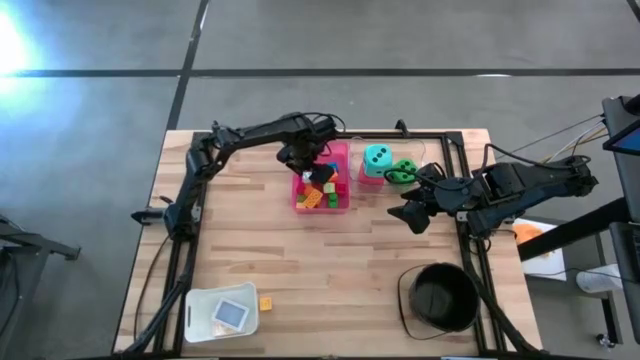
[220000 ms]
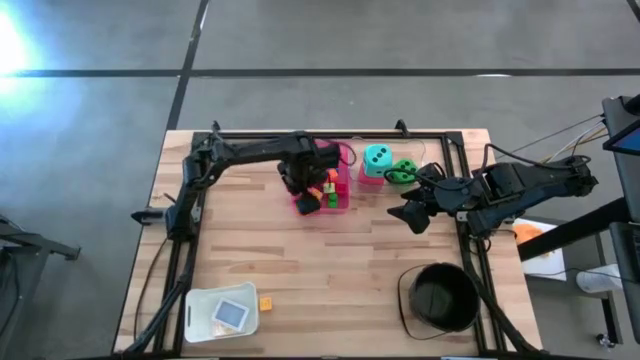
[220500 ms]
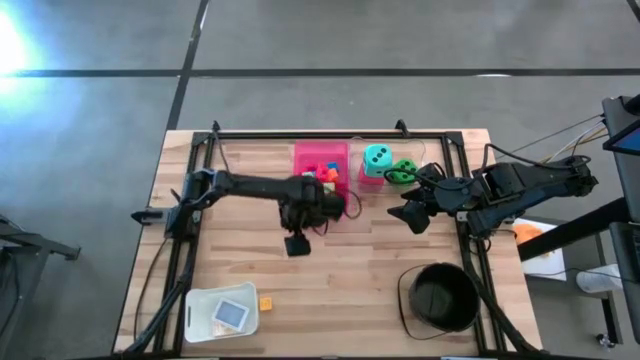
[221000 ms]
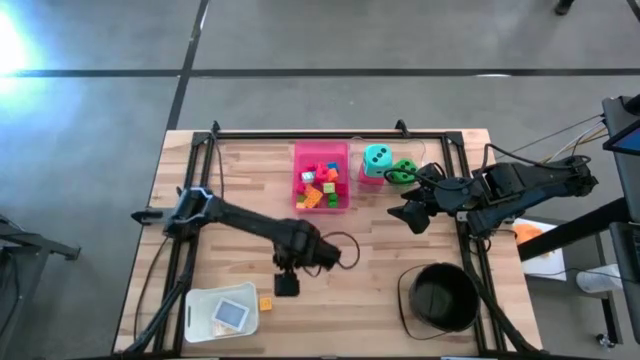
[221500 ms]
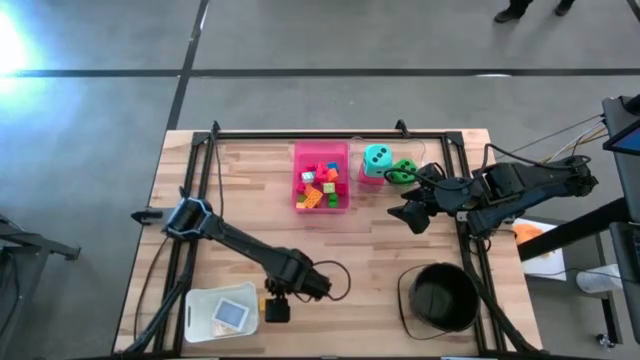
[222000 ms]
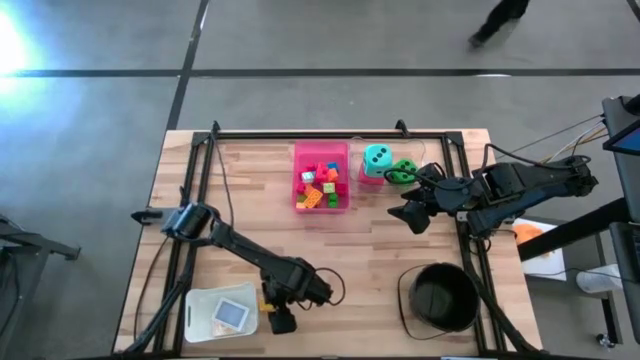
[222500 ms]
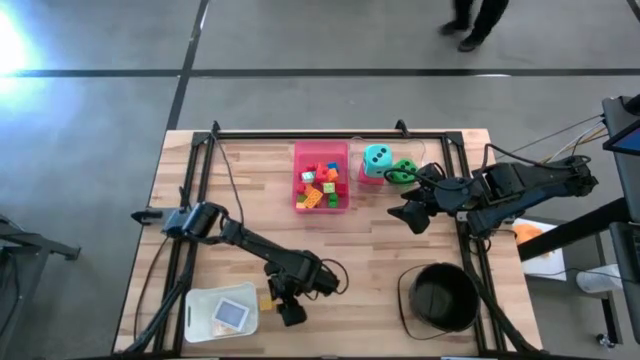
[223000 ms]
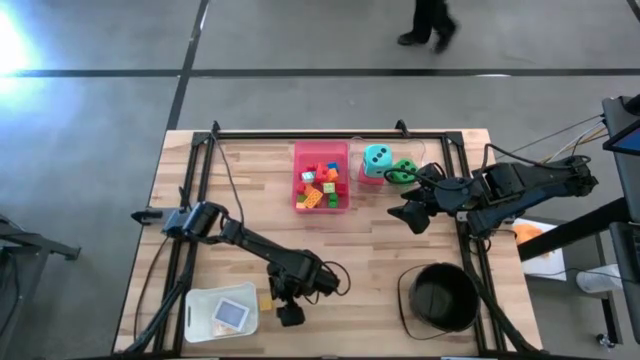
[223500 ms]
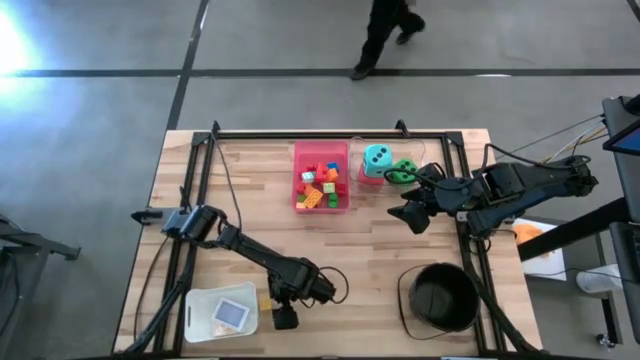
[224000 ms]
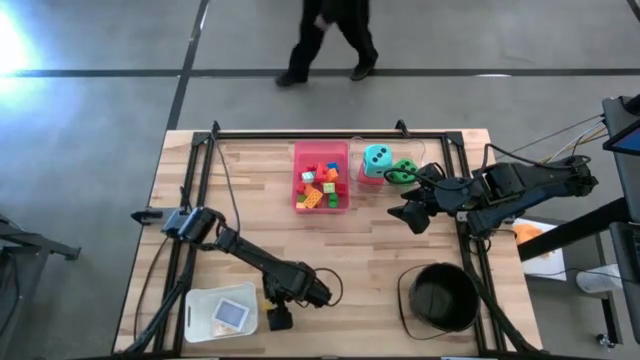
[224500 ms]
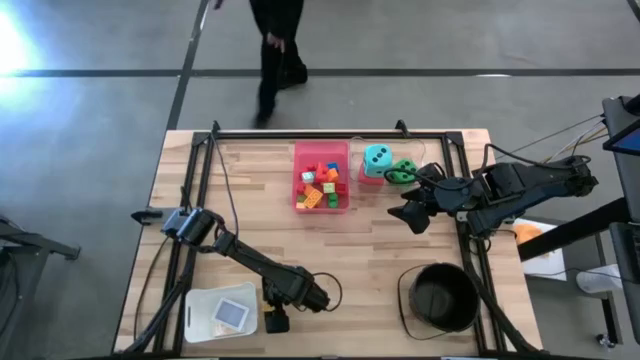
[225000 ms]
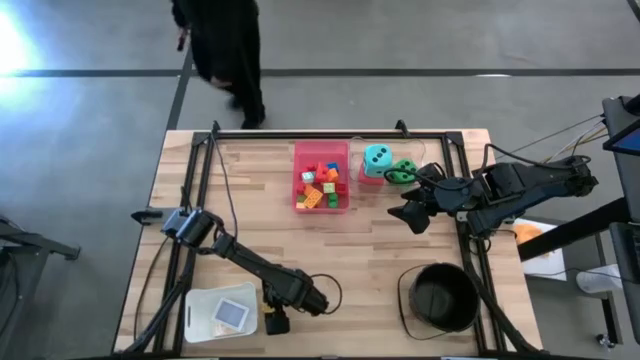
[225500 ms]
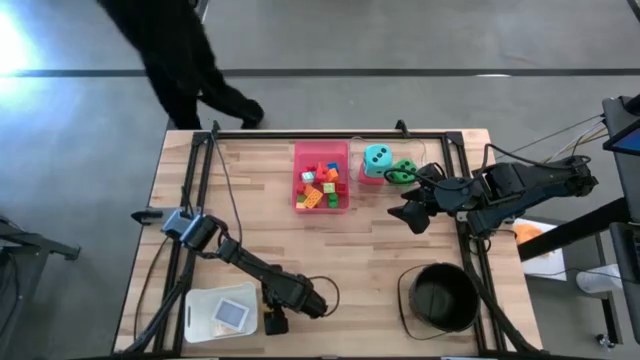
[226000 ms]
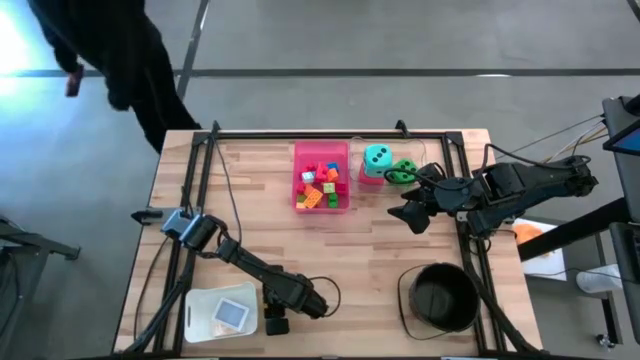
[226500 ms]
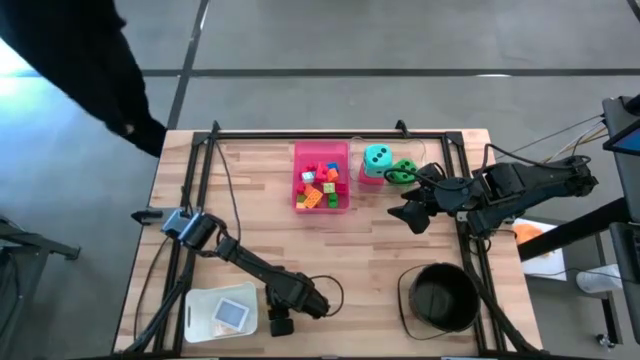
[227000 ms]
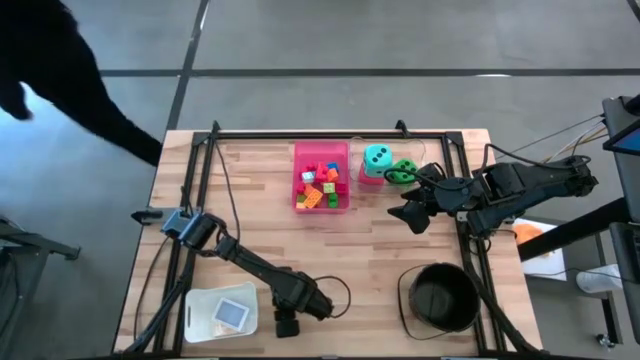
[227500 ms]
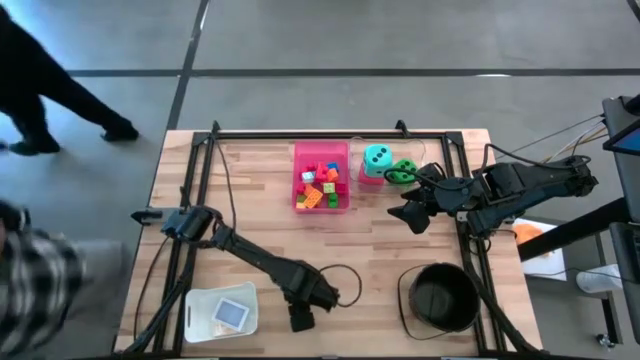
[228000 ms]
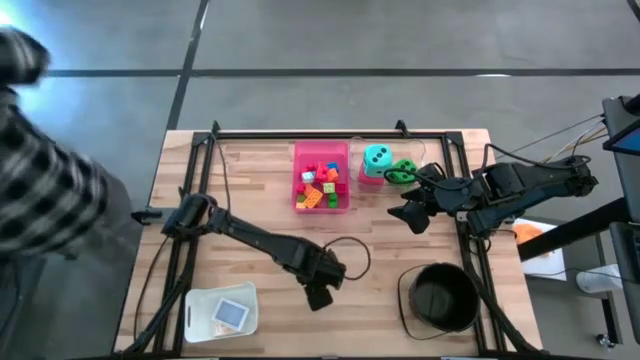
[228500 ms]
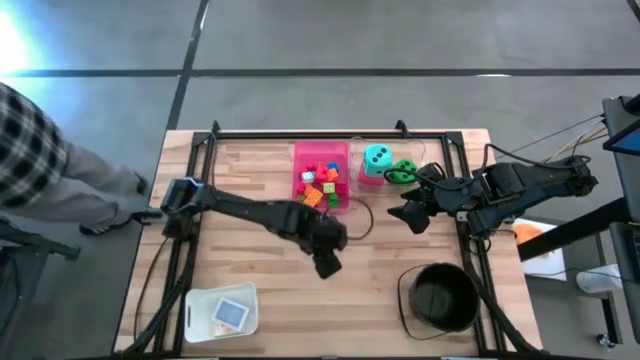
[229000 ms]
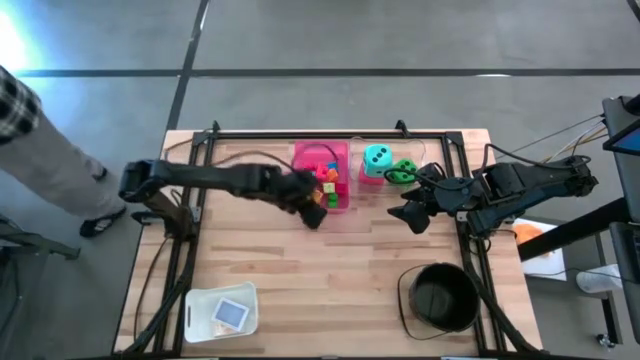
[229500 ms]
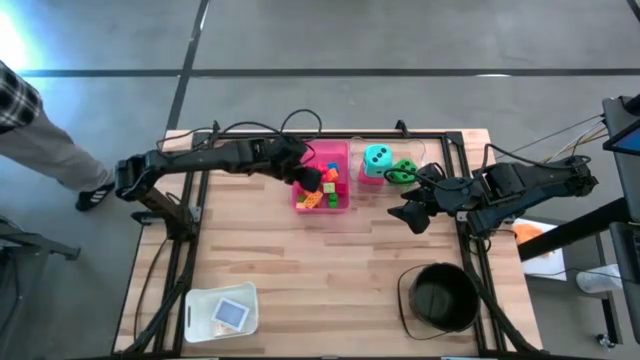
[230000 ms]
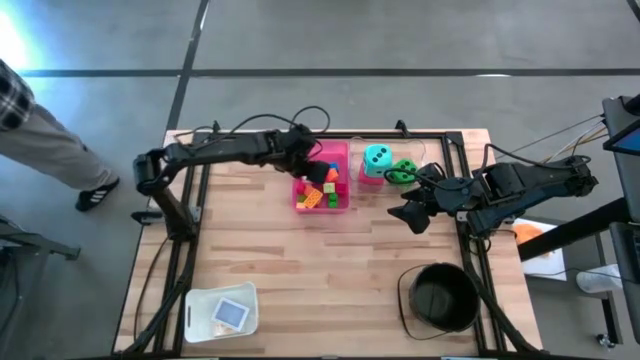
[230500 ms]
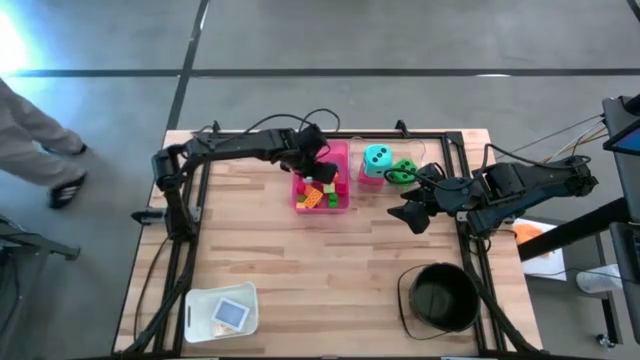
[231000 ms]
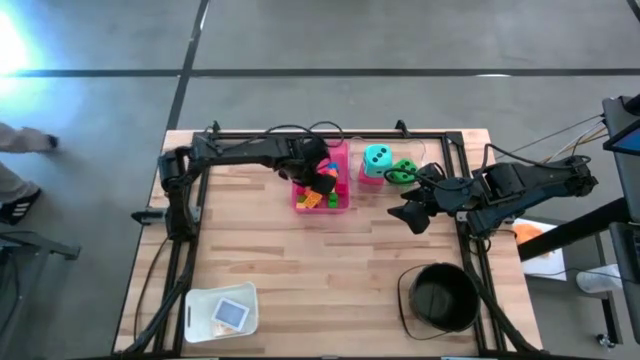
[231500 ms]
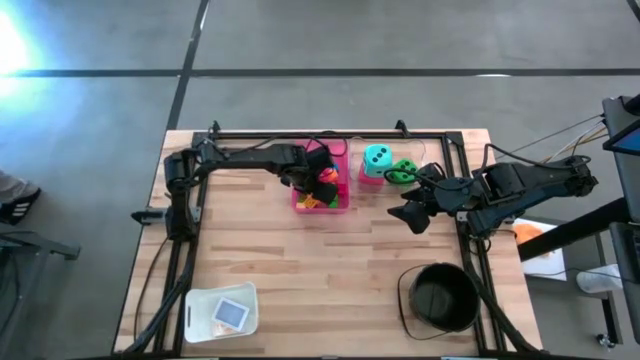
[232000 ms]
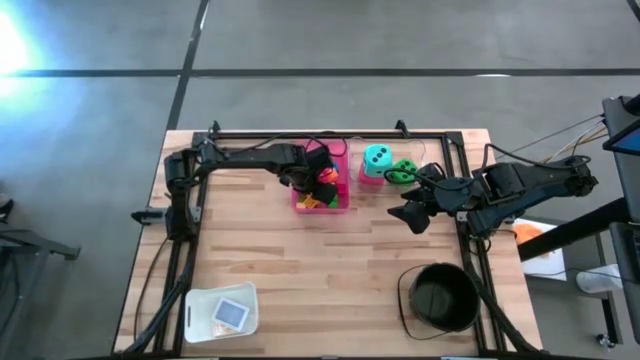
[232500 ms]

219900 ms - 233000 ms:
Task: Pick & Place Toys
Put the light yellow game piece into the red bin

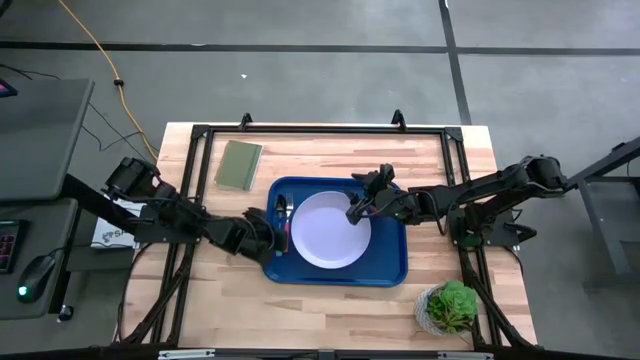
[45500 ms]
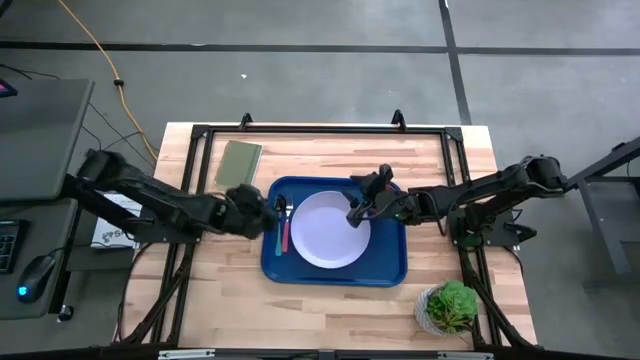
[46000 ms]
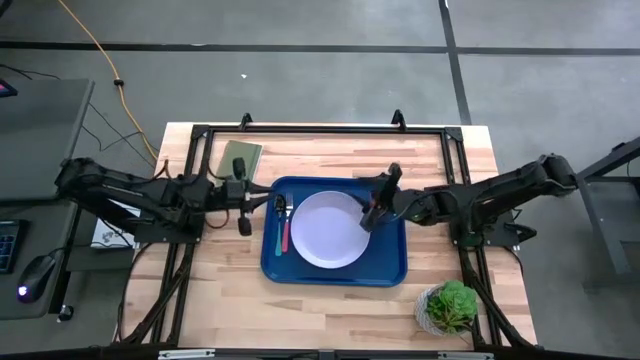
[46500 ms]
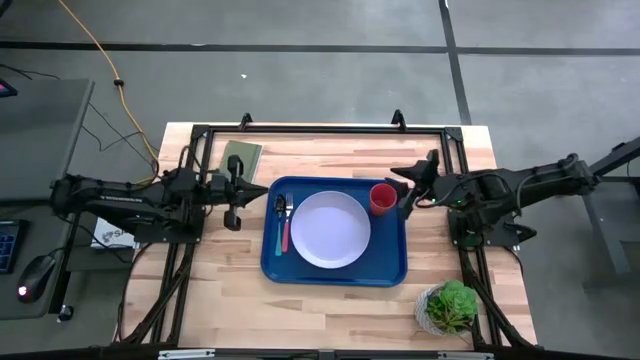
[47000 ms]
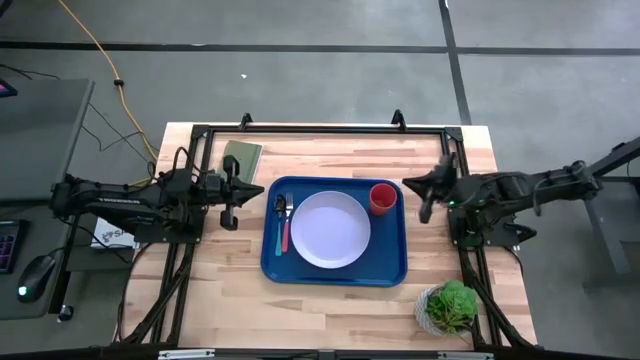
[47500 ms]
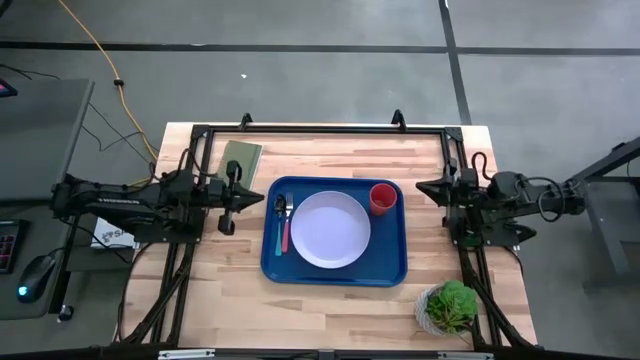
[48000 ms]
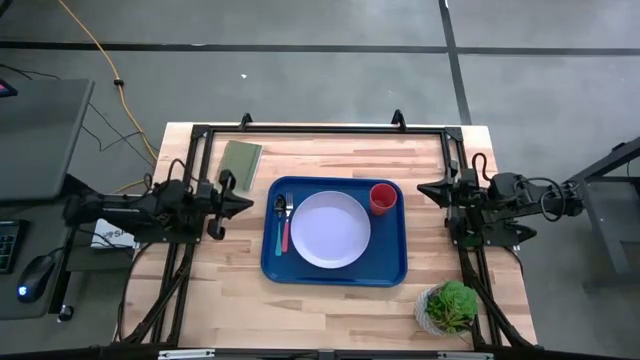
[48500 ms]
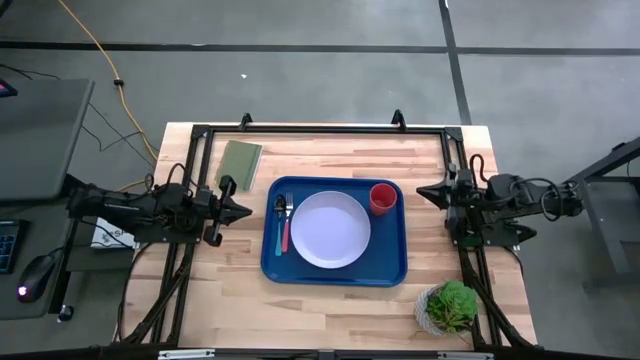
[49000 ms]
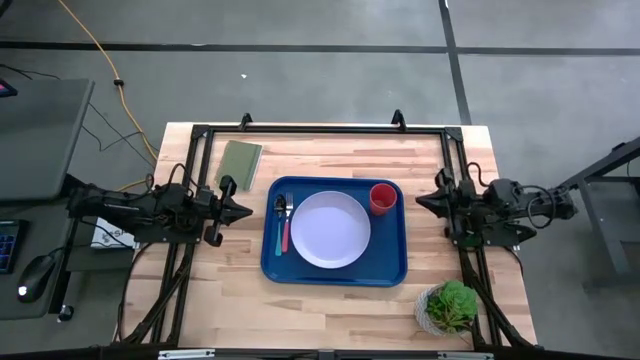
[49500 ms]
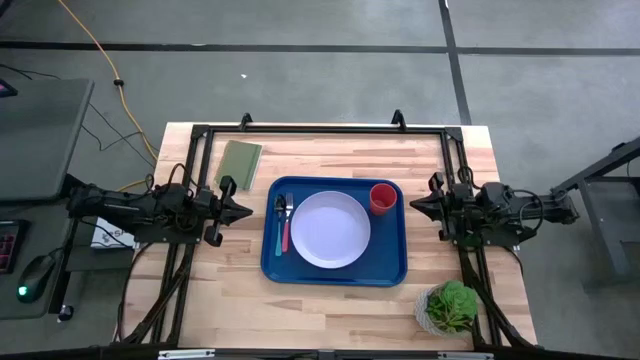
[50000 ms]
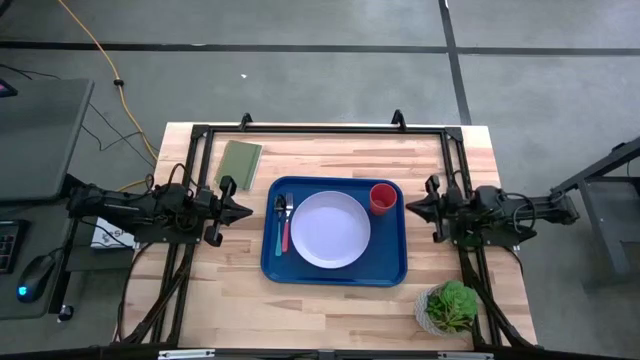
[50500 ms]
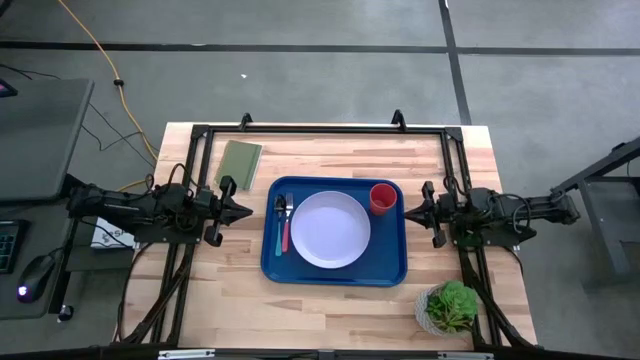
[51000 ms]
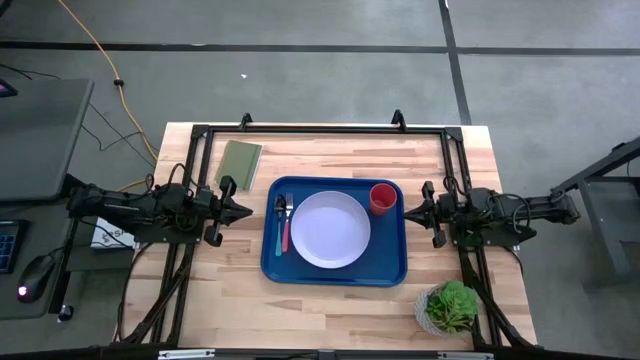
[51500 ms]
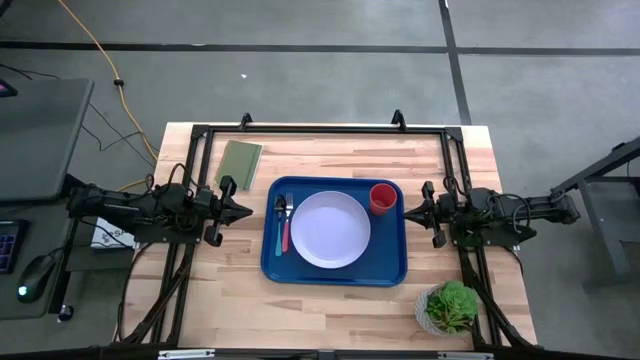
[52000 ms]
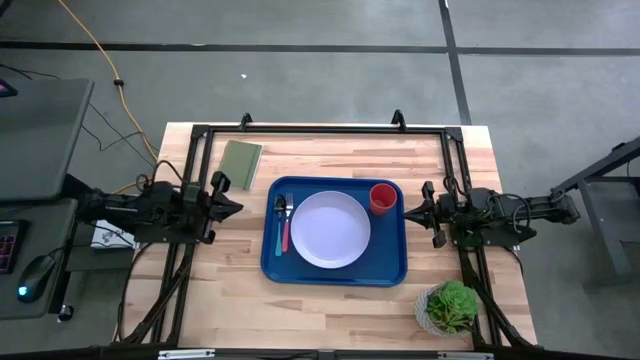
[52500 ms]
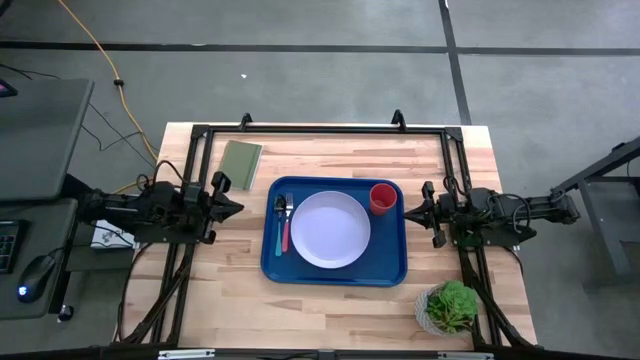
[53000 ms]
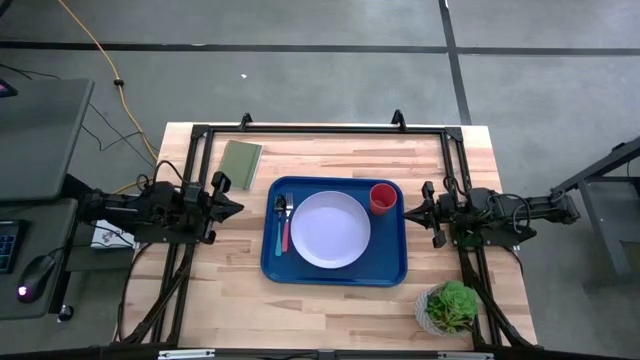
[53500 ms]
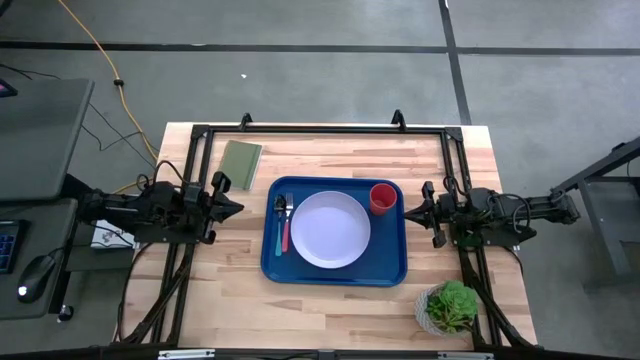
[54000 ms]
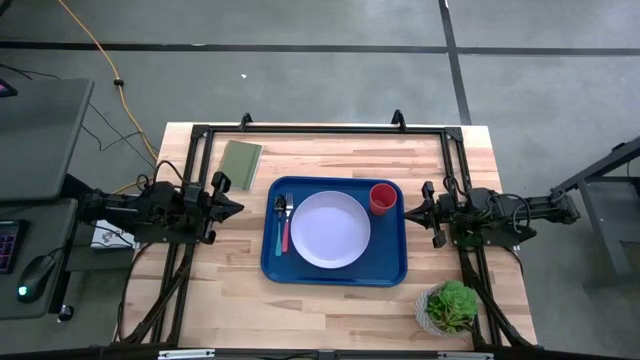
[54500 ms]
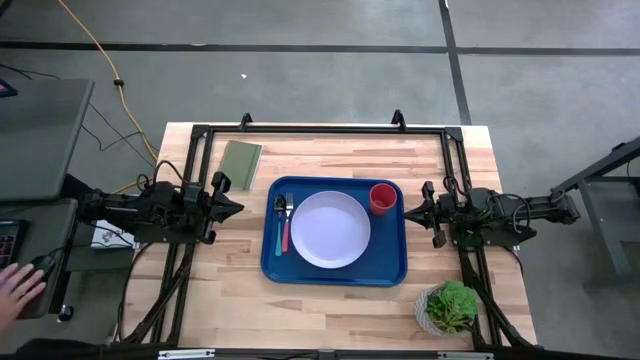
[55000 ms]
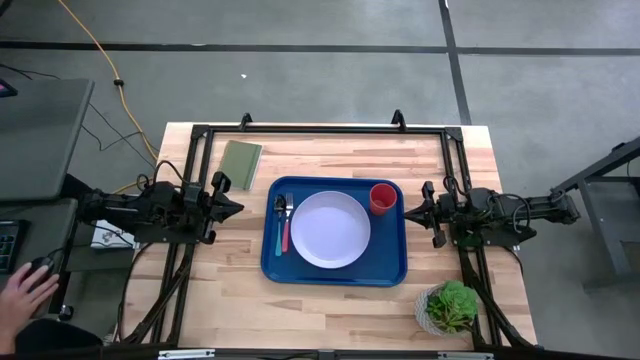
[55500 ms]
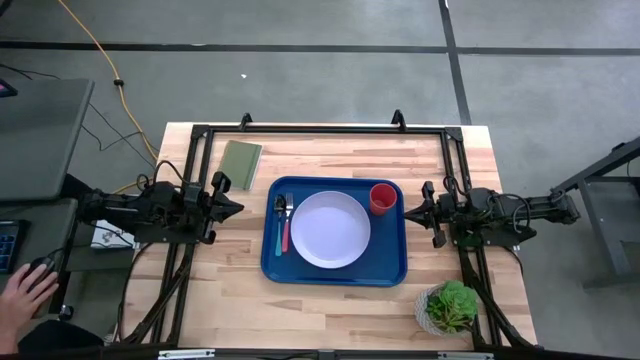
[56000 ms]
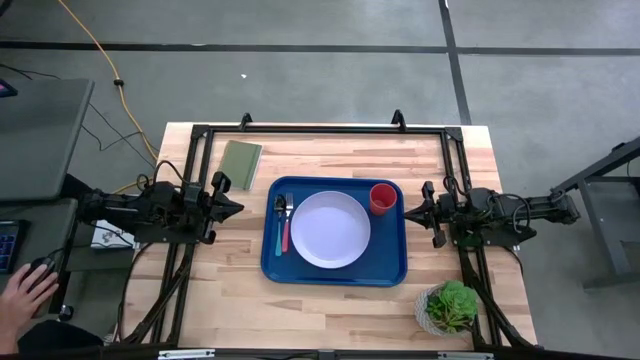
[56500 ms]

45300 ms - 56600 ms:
Task: Pick and place plate/cup/fork/spoon on tray
Return to Home Position
